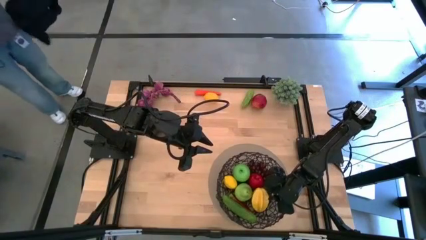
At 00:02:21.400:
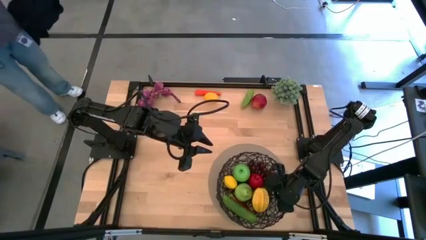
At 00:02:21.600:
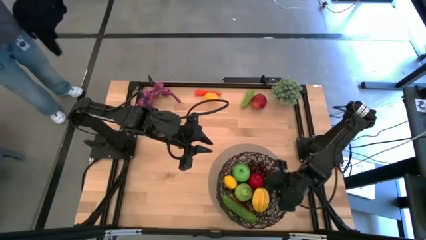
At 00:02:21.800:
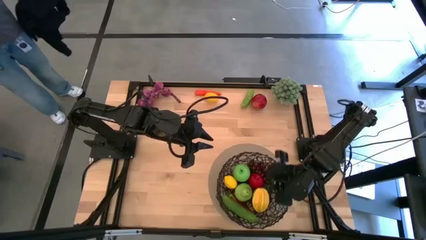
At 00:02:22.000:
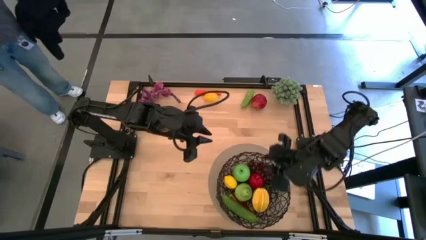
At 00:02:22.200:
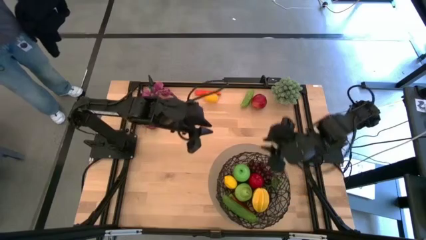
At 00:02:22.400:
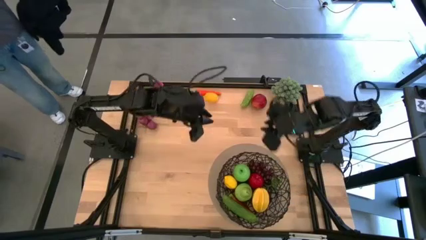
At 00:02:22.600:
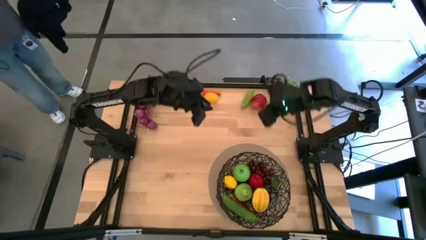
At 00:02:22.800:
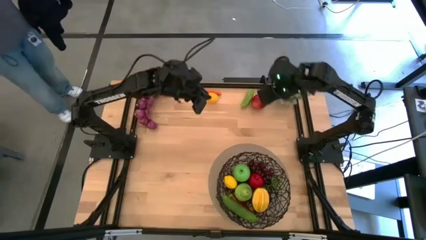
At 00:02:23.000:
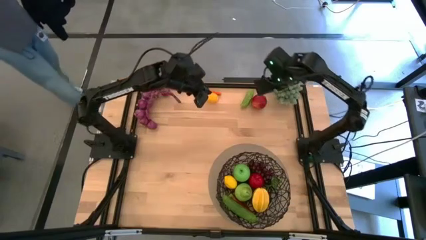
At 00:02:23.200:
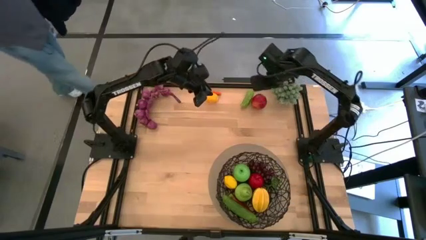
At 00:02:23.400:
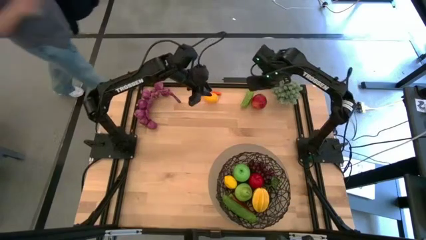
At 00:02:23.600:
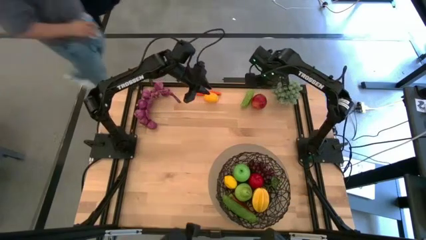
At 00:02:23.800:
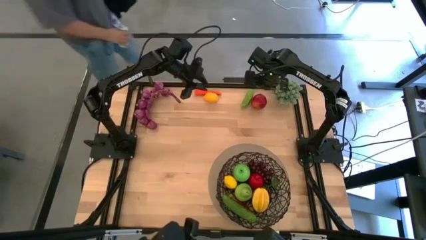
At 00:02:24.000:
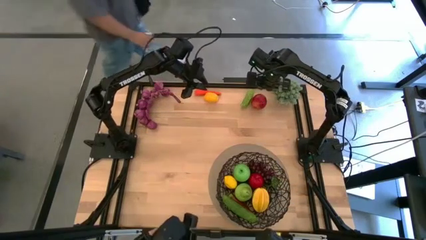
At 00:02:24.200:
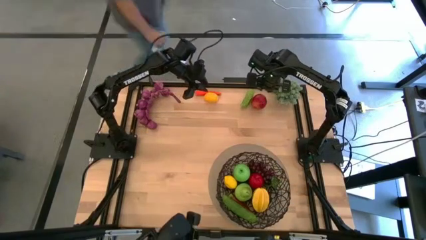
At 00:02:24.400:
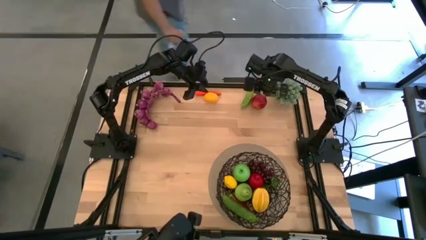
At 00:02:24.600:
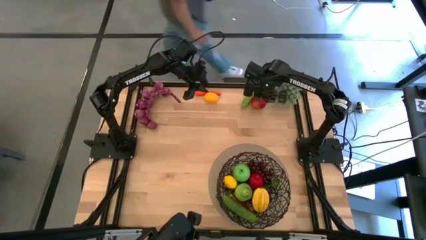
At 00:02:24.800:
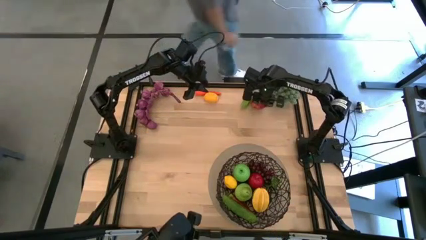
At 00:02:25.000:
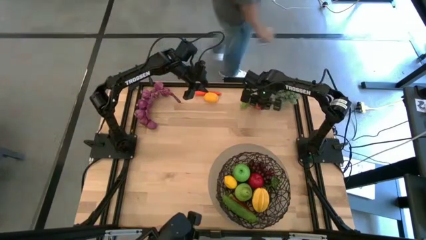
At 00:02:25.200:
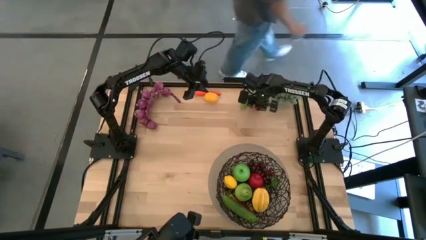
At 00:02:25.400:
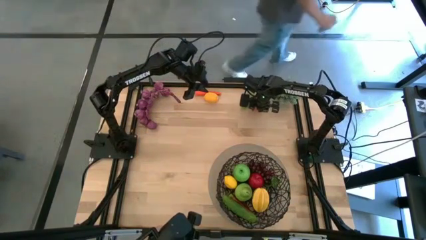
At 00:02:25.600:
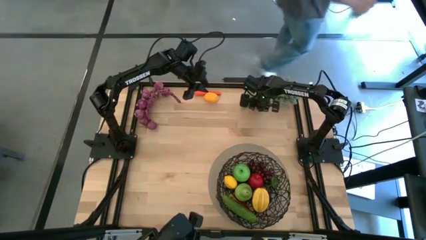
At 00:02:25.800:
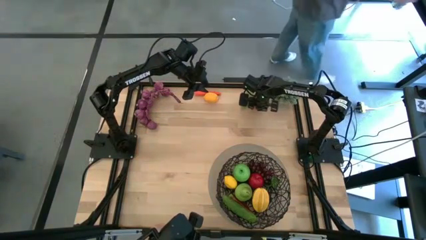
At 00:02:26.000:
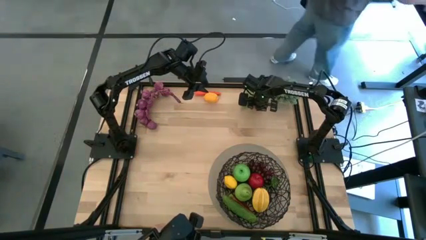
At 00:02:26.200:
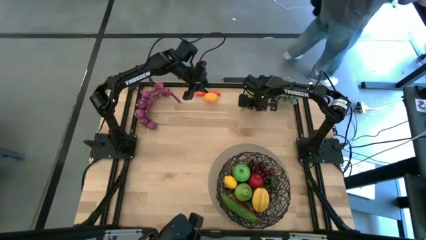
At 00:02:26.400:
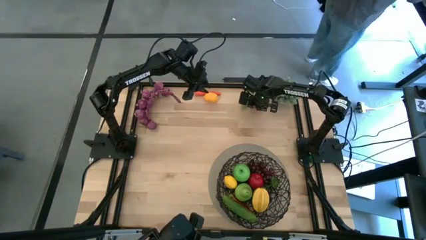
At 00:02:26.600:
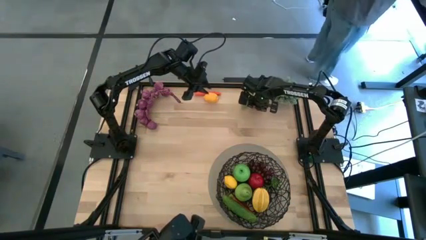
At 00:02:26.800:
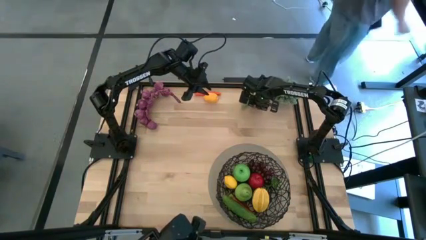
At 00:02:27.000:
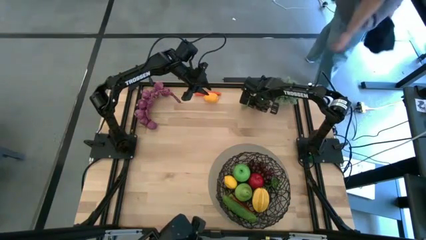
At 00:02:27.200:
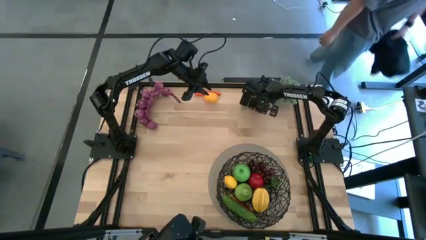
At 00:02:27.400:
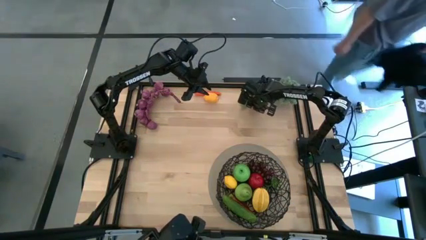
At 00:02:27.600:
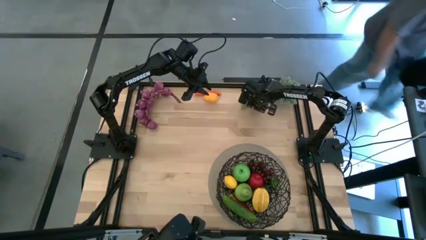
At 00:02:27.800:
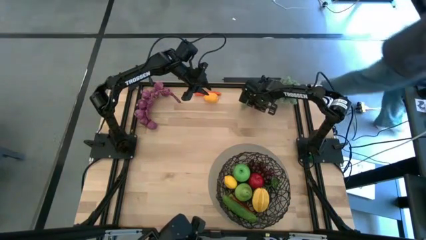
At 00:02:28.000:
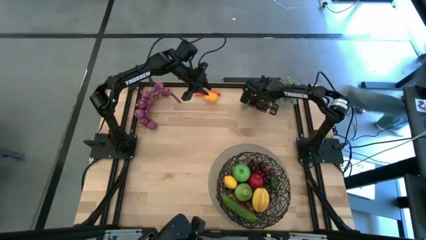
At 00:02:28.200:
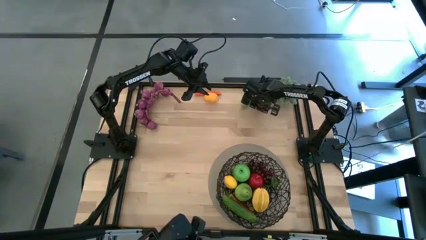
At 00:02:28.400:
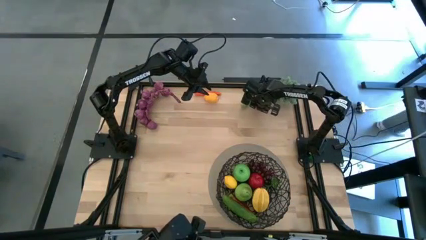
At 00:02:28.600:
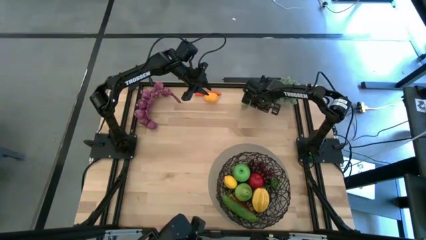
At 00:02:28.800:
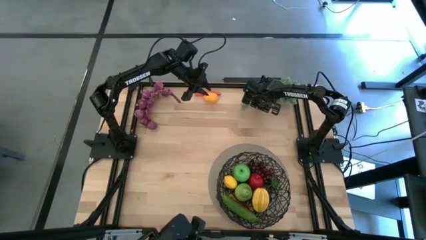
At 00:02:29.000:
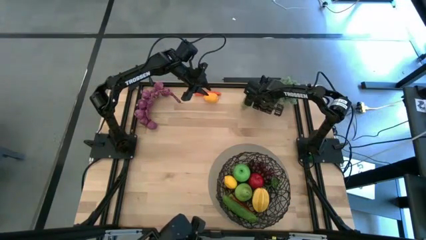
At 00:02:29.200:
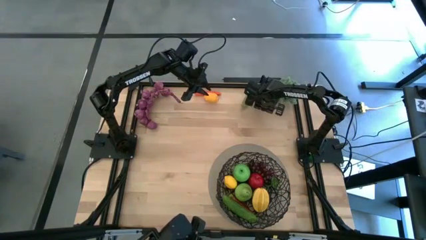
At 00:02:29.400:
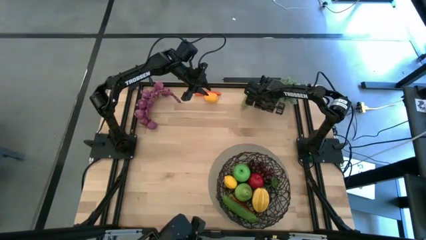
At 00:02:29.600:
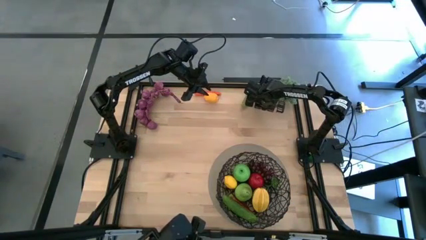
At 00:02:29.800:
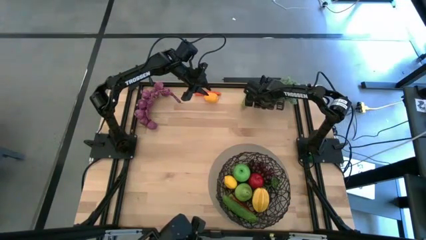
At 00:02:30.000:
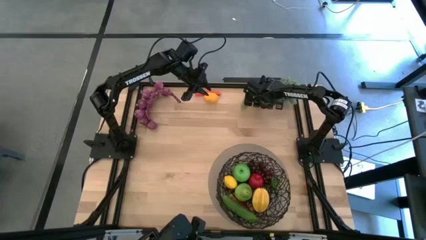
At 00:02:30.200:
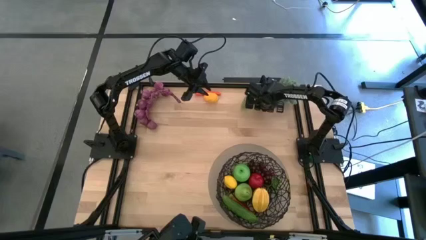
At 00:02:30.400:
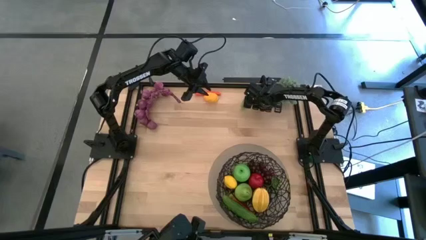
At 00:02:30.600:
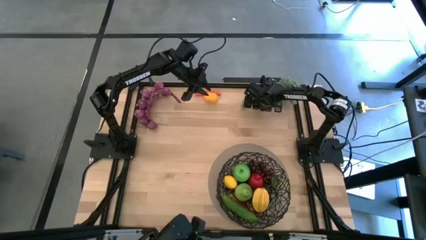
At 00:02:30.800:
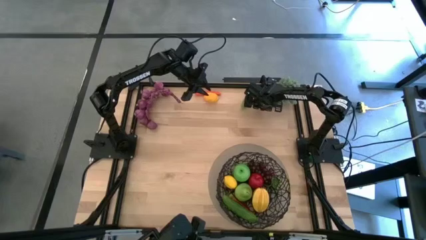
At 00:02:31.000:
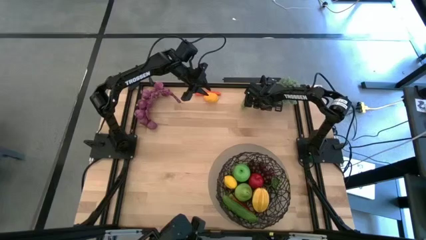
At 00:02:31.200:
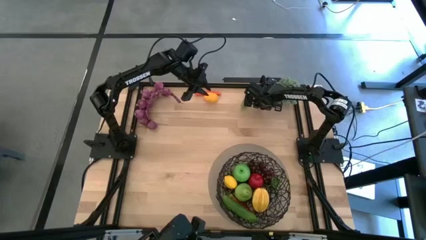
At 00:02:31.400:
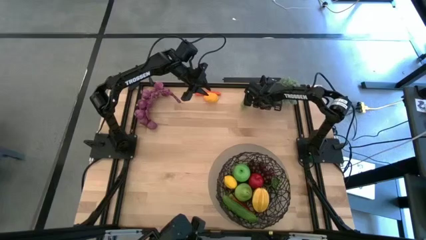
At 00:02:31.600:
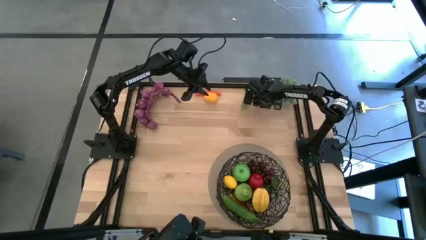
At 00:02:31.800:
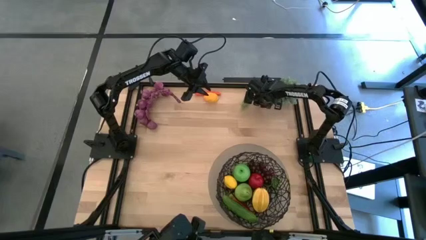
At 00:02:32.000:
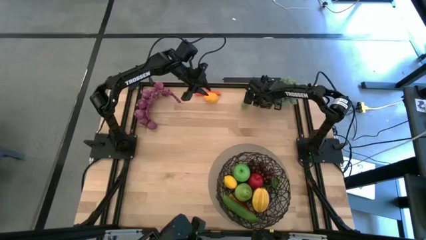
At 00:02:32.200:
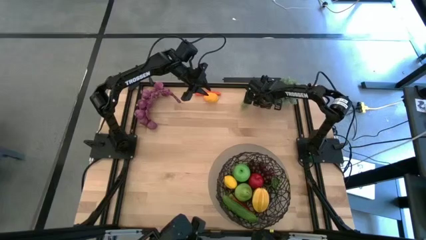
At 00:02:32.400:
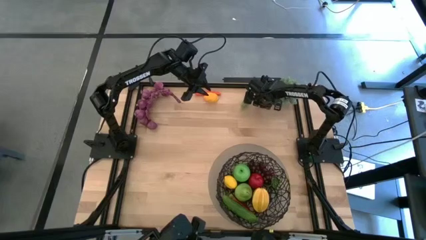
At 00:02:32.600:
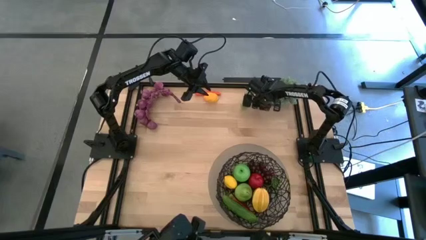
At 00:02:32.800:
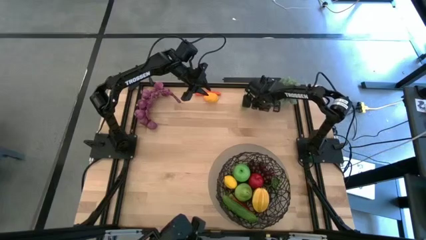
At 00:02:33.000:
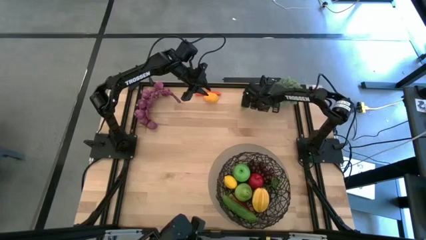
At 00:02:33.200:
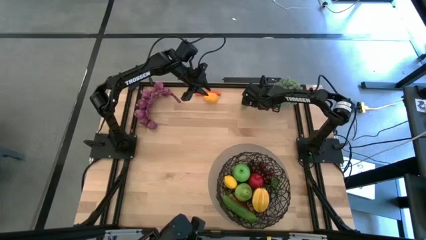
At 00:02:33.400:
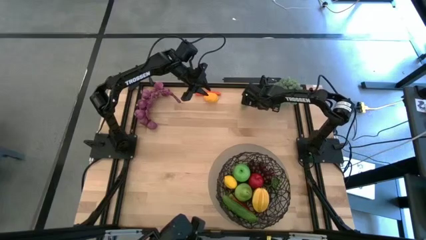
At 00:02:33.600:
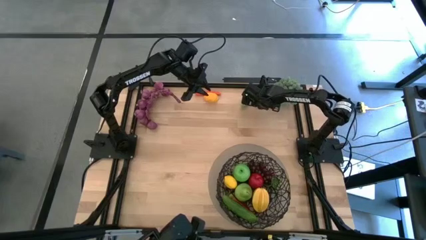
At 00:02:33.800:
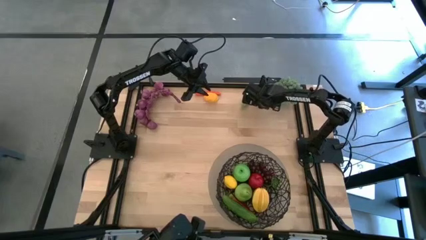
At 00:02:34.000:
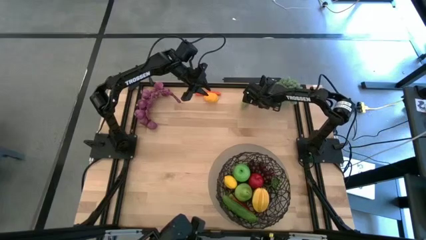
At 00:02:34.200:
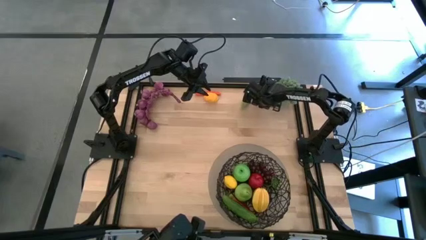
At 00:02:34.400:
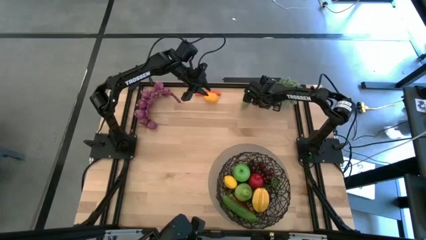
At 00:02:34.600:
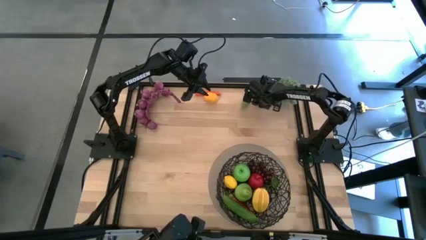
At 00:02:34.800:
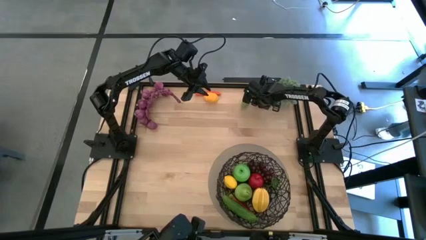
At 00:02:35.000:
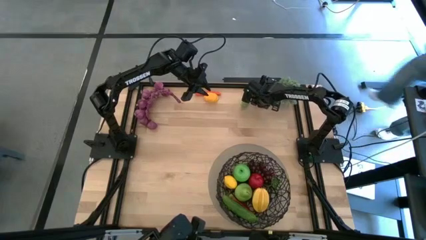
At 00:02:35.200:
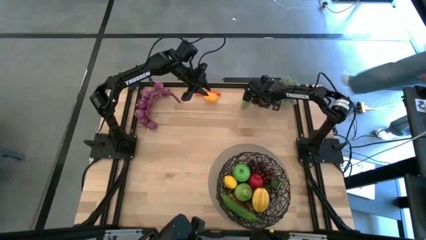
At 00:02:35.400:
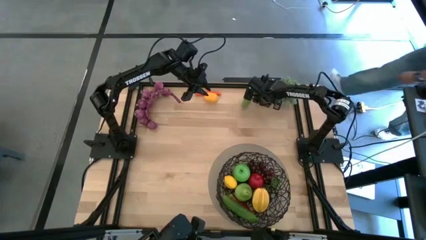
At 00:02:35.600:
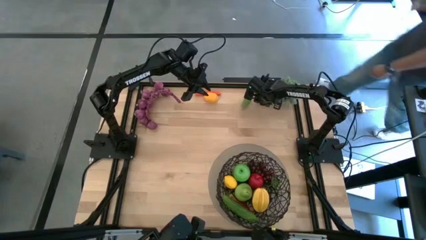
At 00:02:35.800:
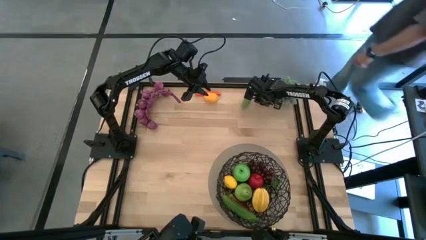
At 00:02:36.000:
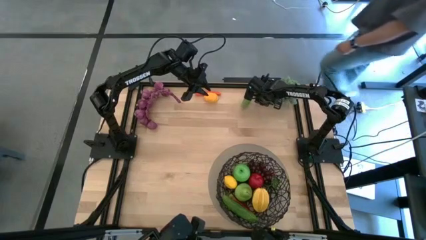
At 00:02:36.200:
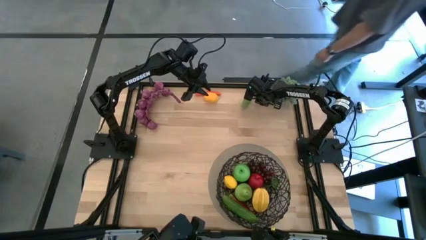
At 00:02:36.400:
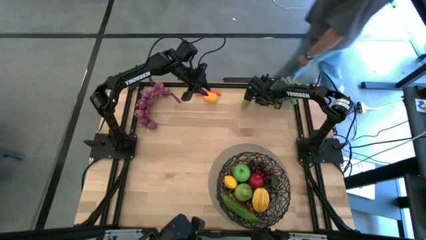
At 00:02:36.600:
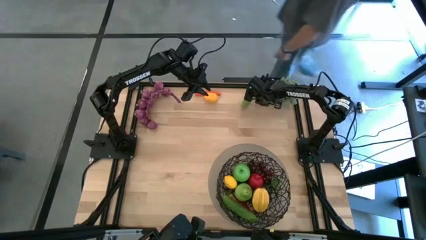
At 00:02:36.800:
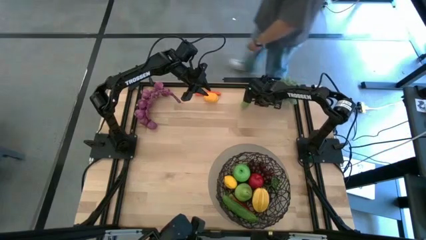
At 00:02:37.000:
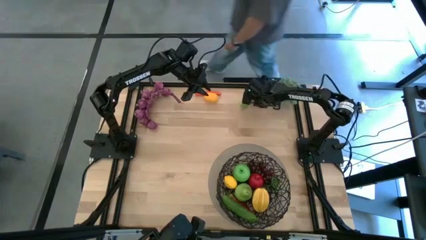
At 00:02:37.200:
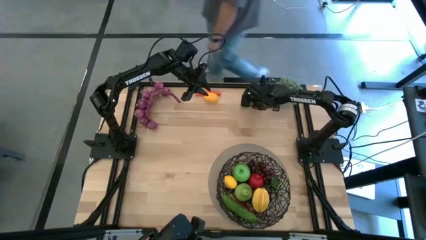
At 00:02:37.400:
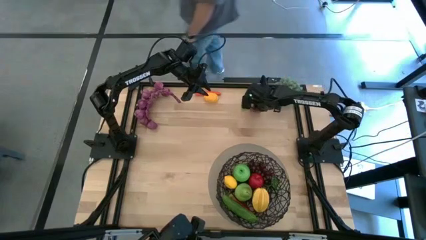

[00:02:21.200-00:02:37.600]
Task: Build produce basket
Put the red pomegranate into the wire basket

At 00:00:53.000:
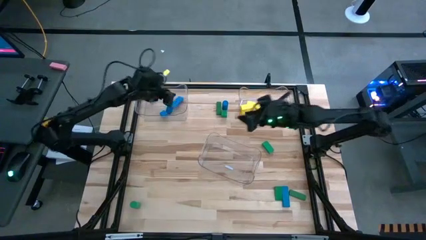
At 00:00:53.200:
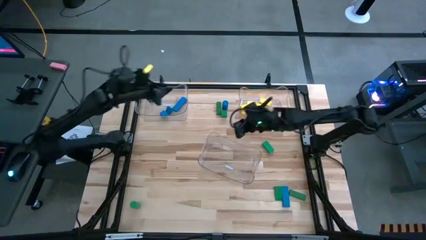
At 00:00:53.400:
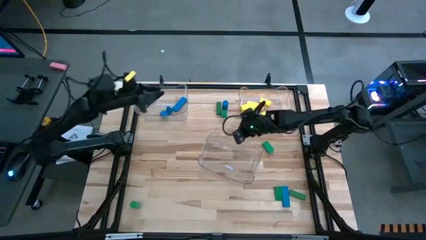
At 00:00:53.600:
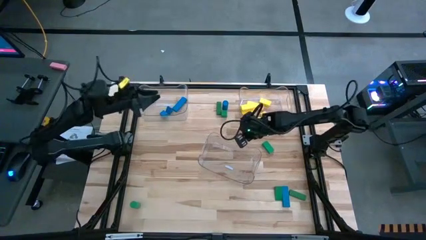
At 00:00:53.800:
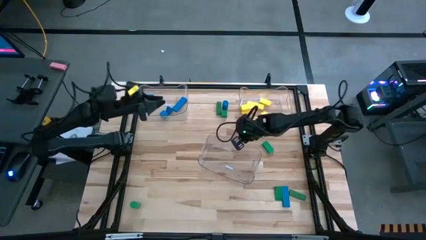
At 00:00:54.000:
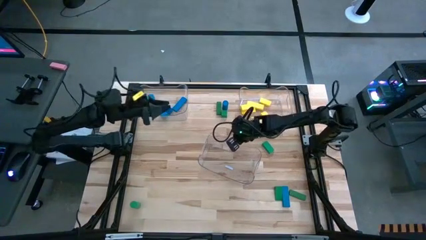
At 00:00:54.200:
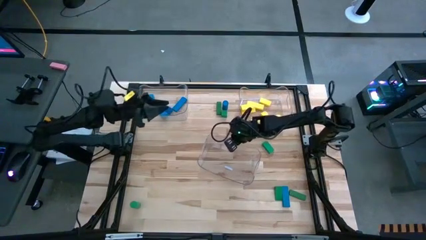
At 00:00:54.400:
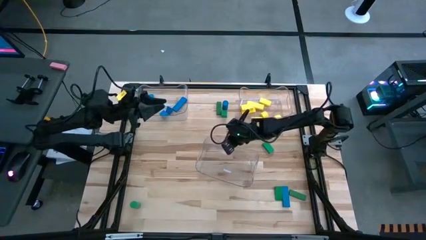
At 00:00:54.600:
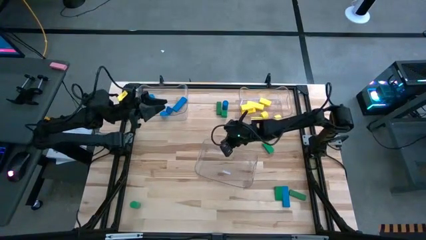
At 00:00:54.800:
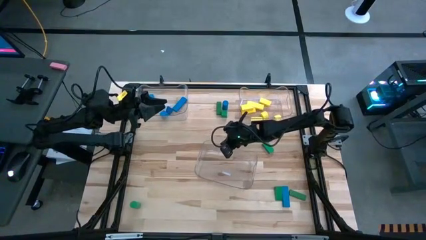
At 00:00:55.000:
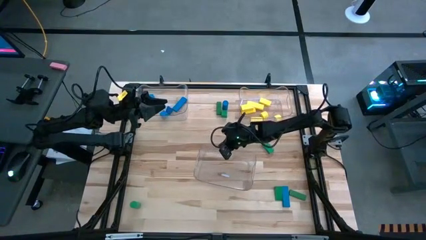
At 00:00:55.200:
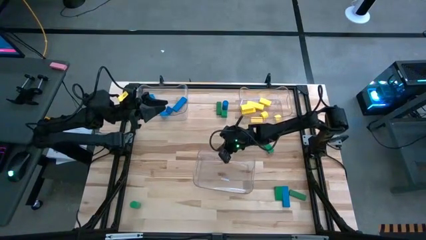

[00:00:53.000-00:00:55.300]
Task: Sort blocks
Adjust the bottom transparent bin
